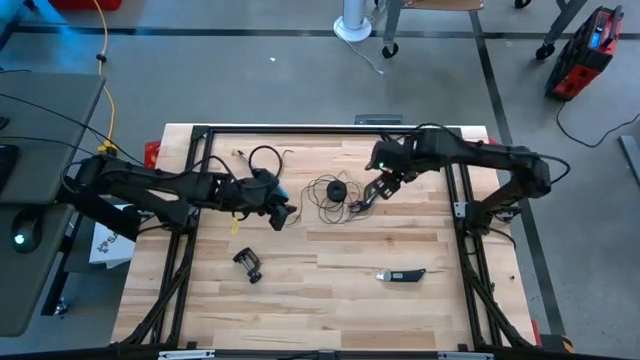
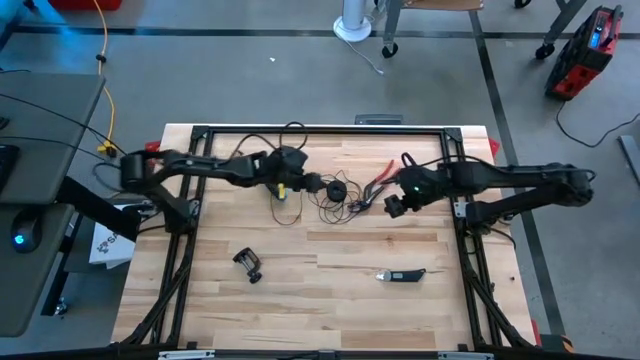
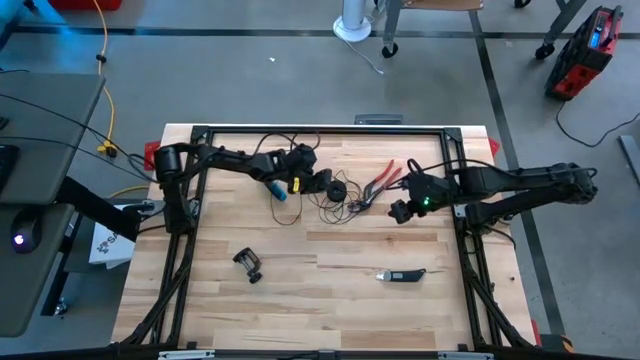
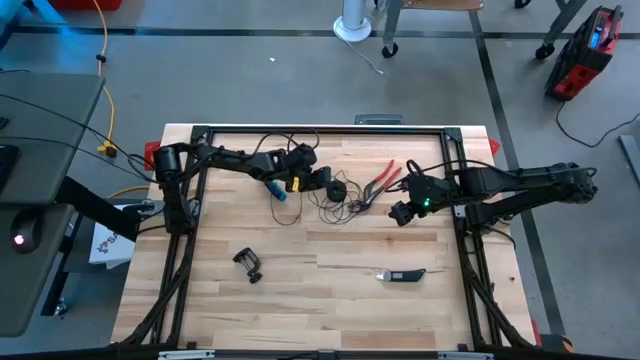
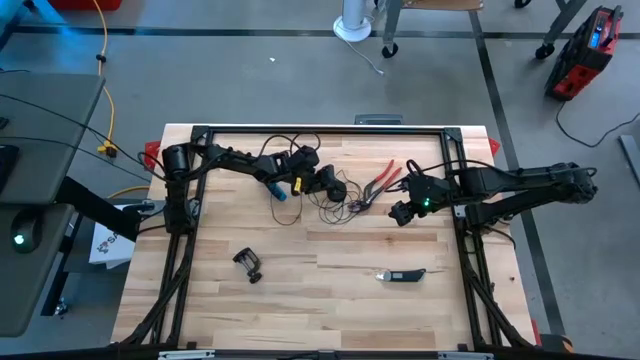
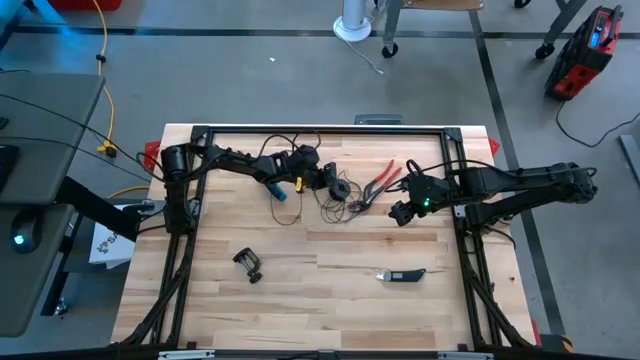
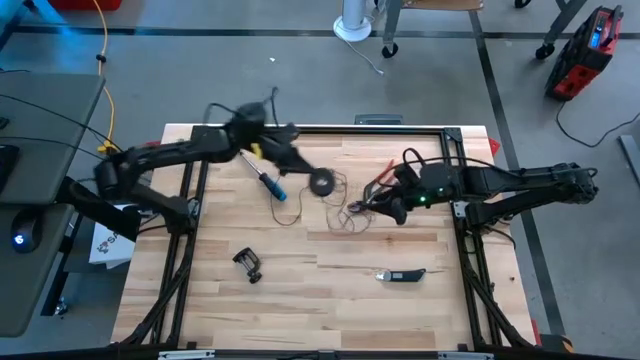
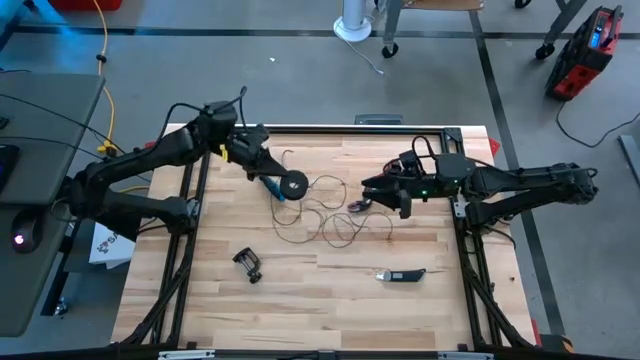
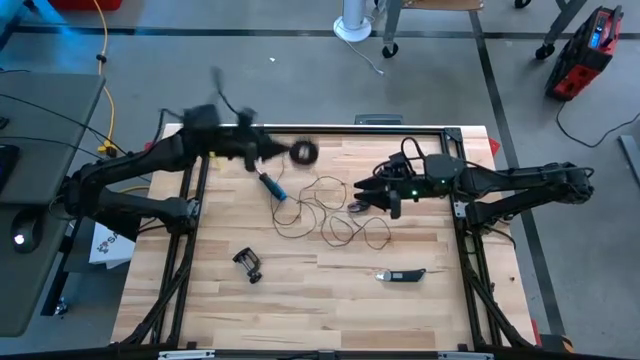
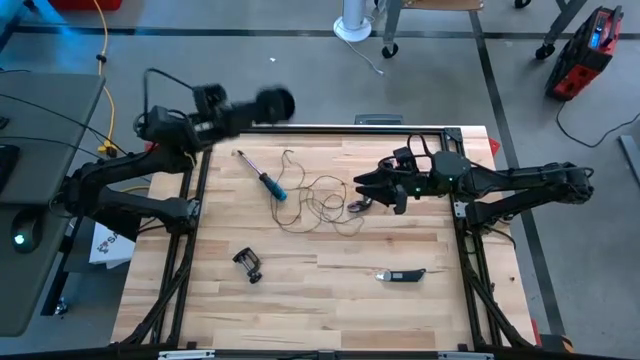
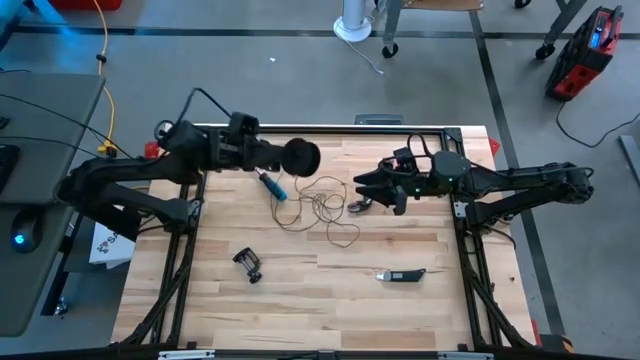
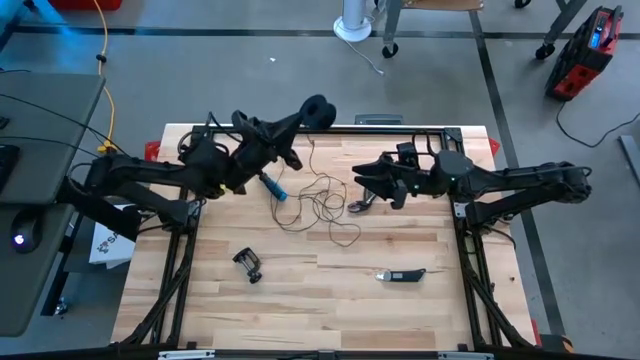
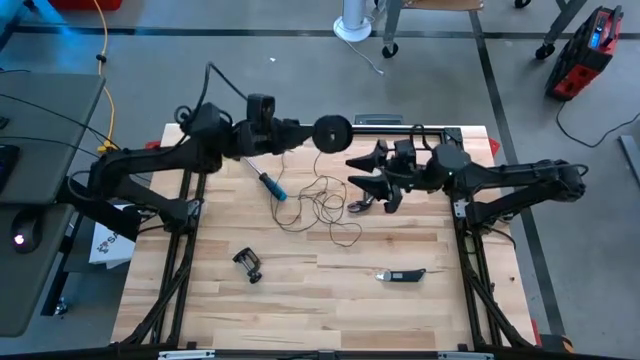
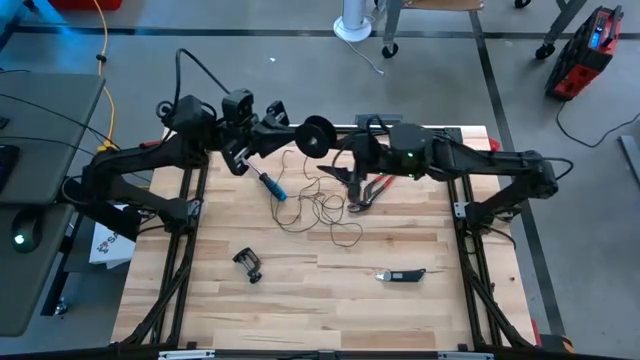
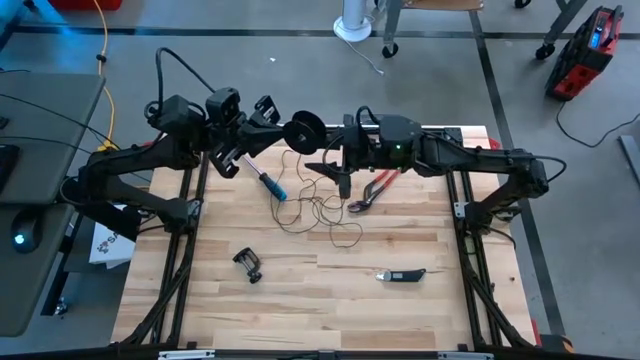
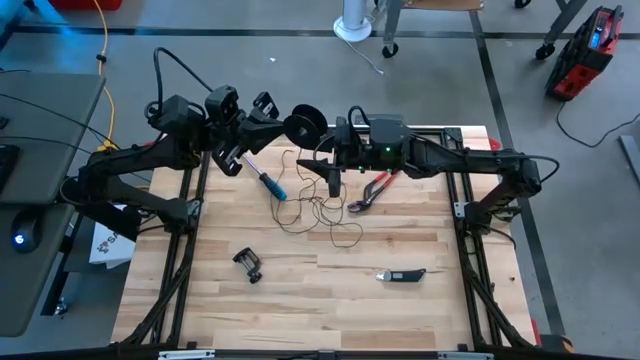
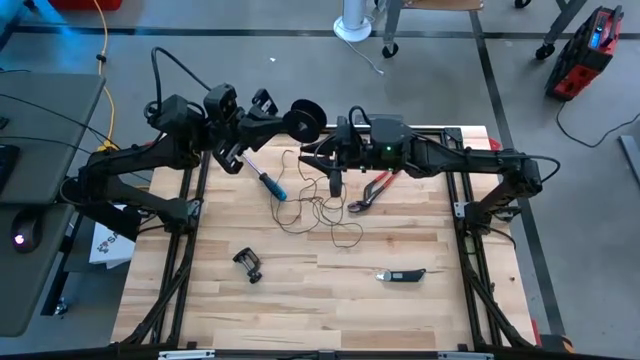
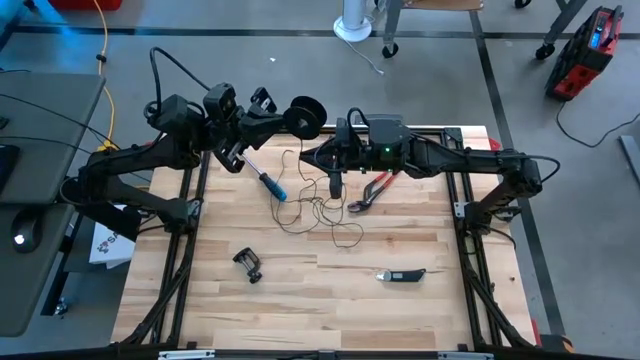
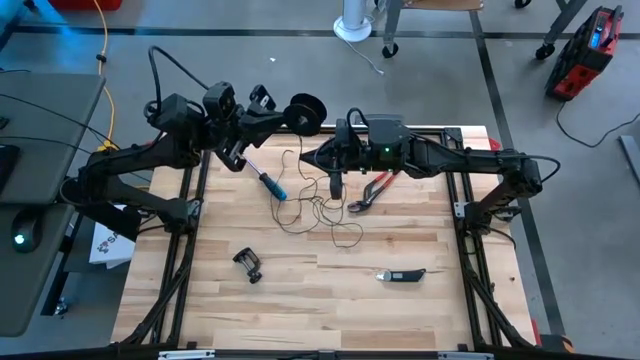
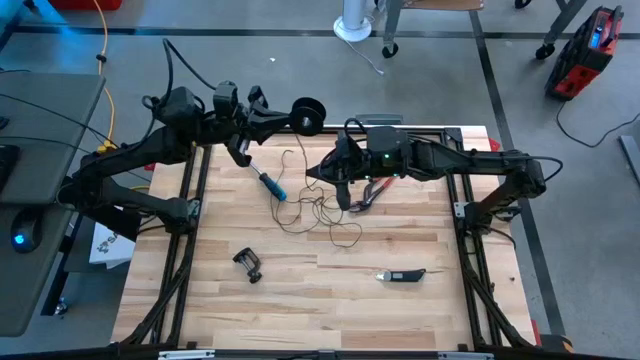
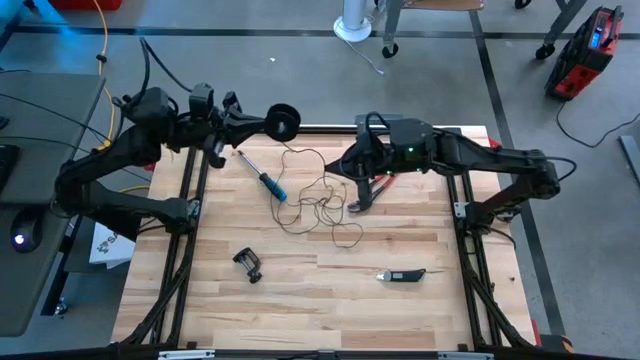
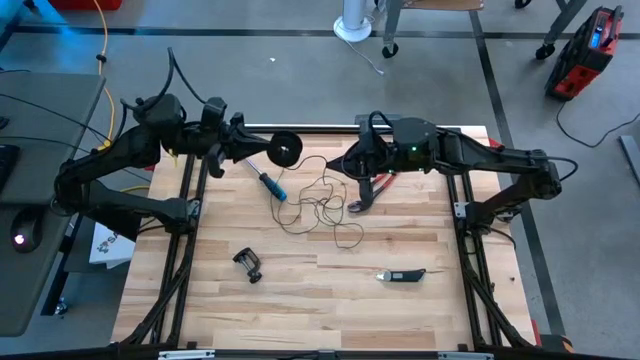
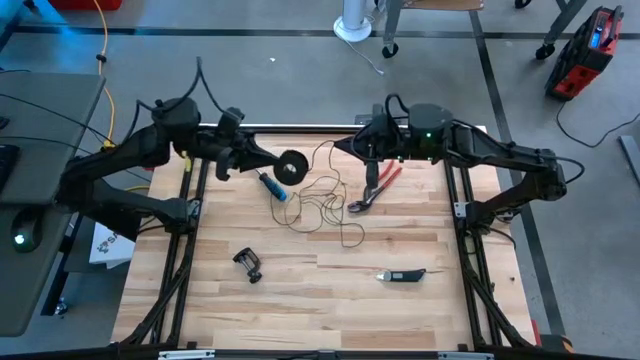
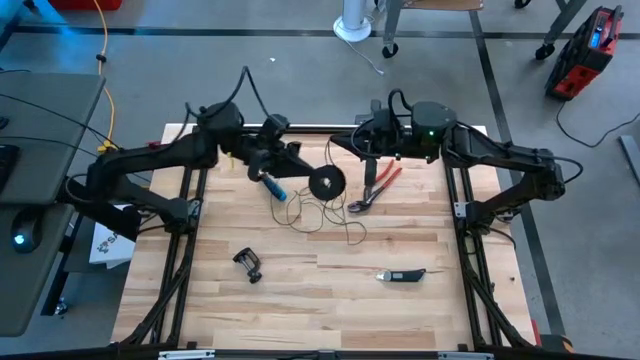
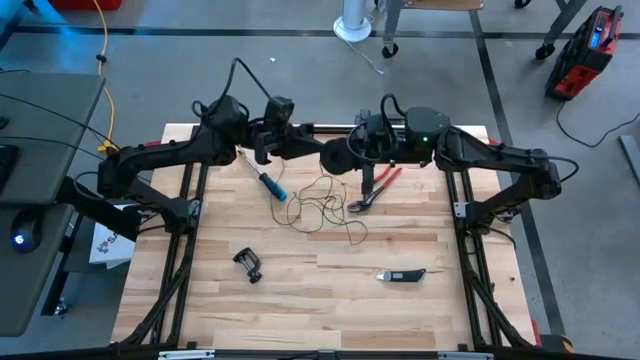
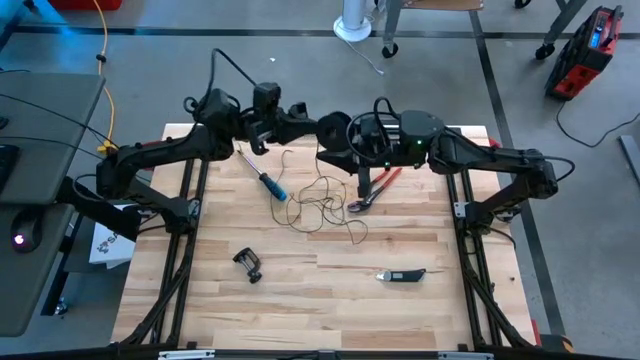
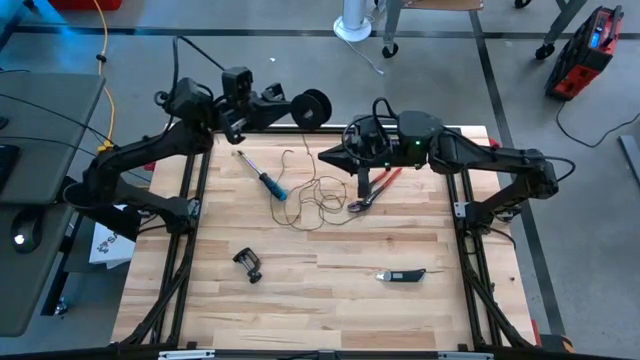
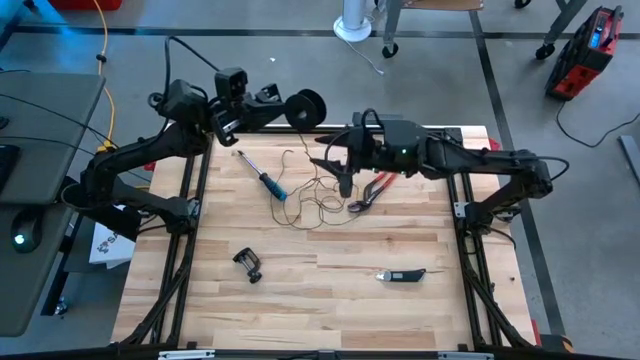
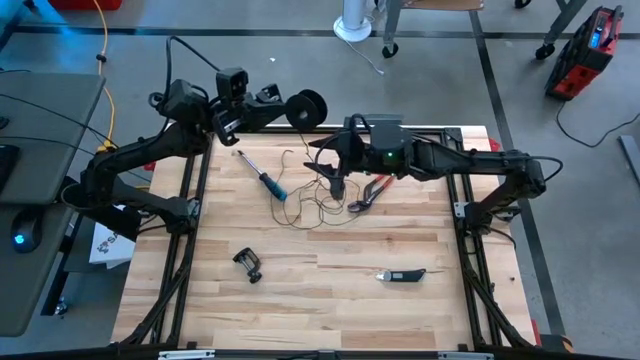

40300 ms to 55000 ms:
Task: Coil cords
Coil the black wire onto the black spool
